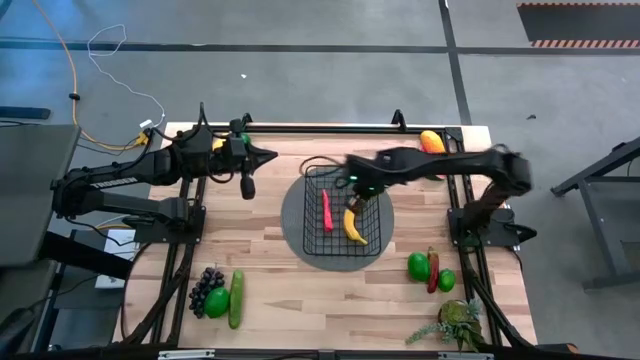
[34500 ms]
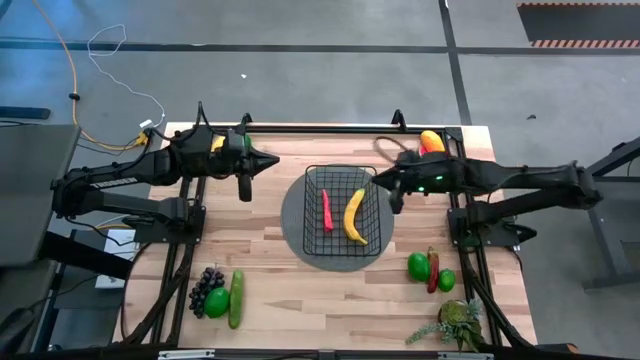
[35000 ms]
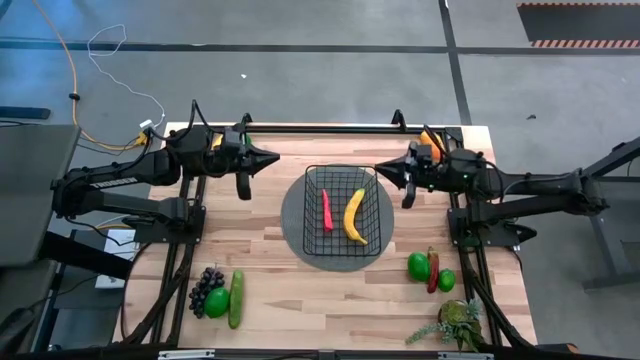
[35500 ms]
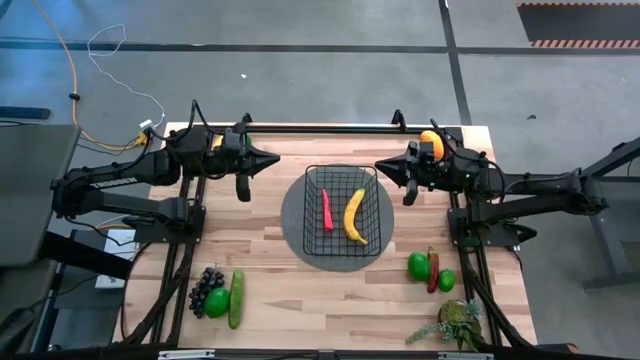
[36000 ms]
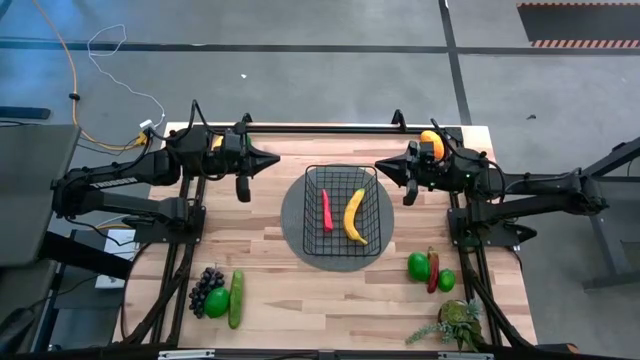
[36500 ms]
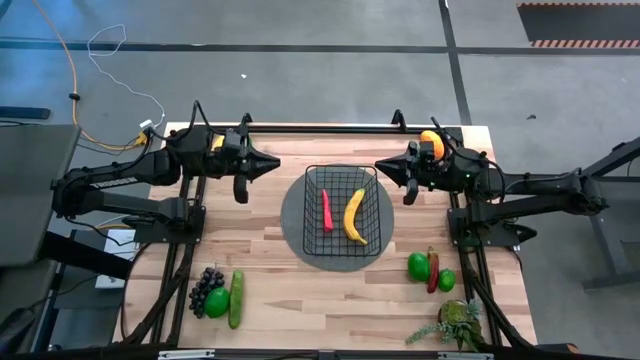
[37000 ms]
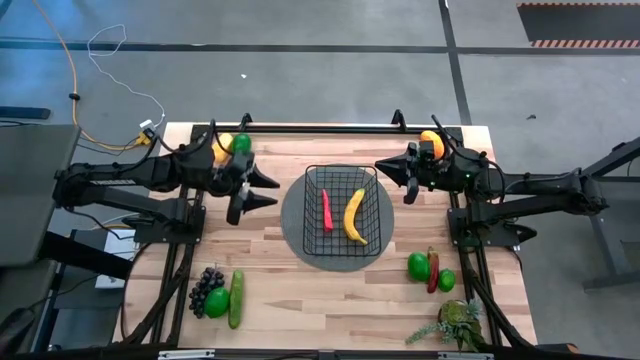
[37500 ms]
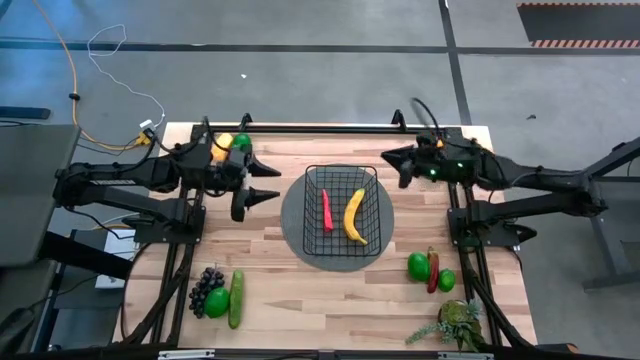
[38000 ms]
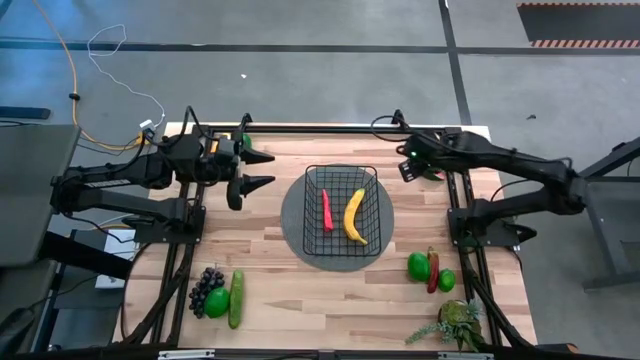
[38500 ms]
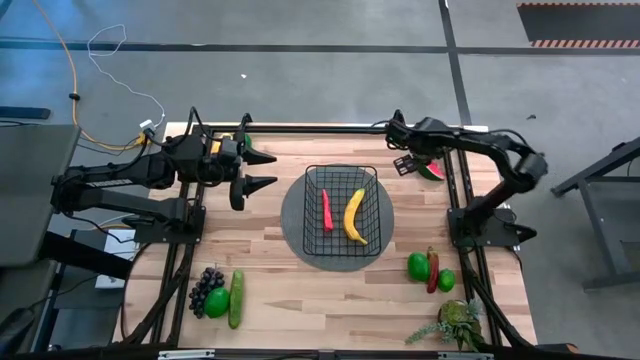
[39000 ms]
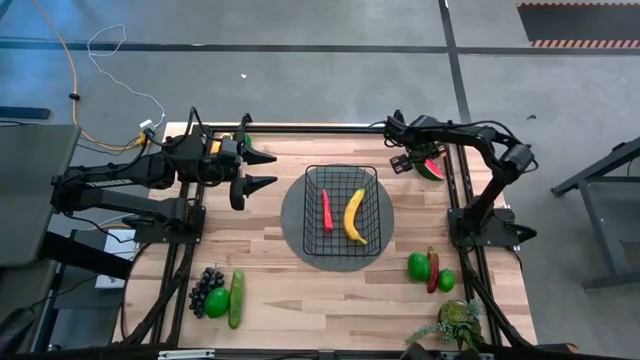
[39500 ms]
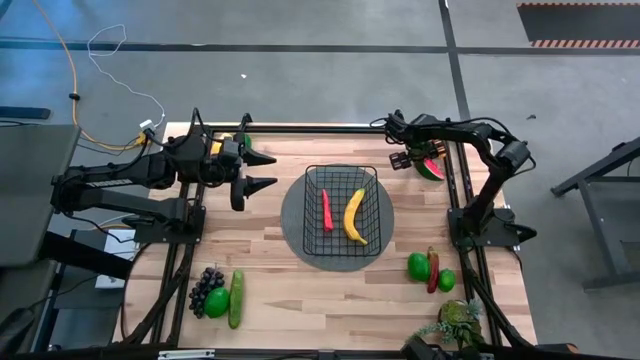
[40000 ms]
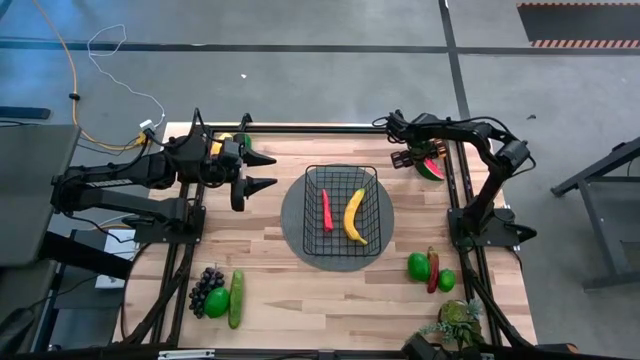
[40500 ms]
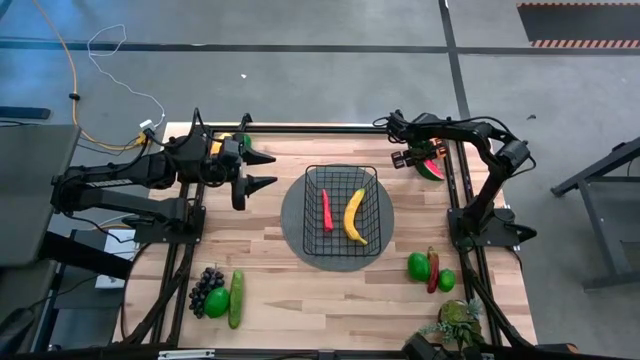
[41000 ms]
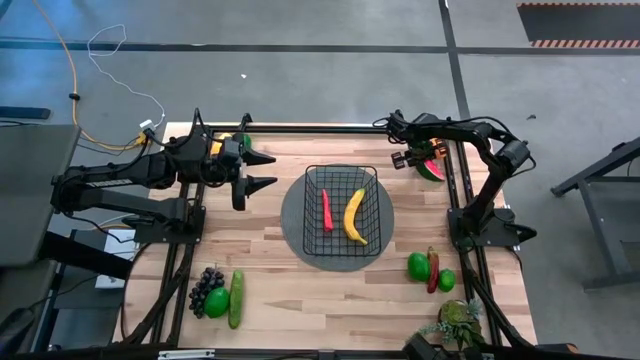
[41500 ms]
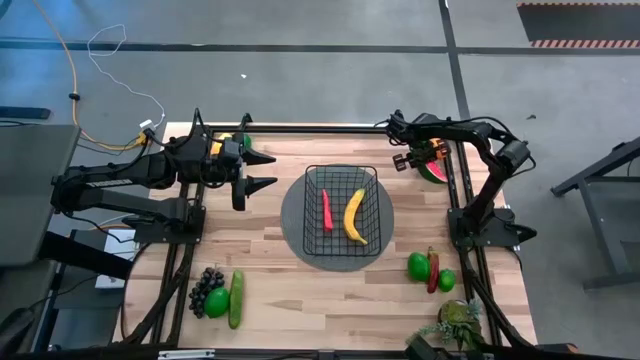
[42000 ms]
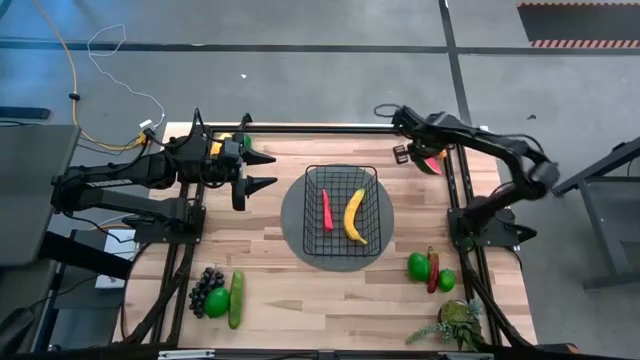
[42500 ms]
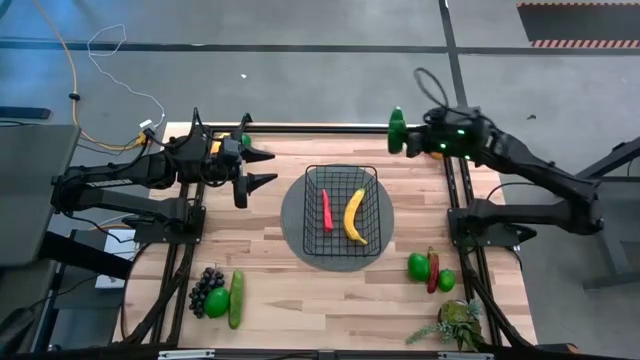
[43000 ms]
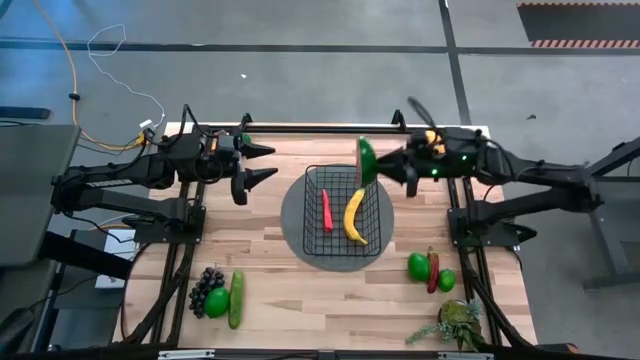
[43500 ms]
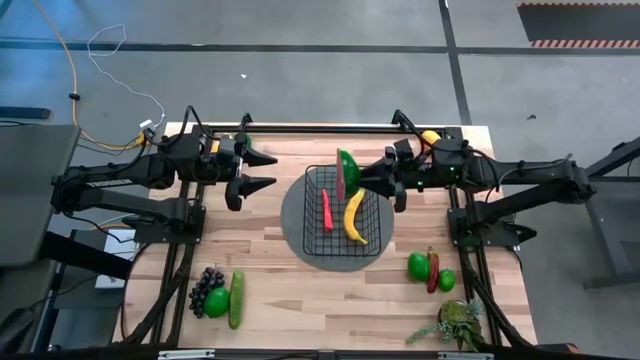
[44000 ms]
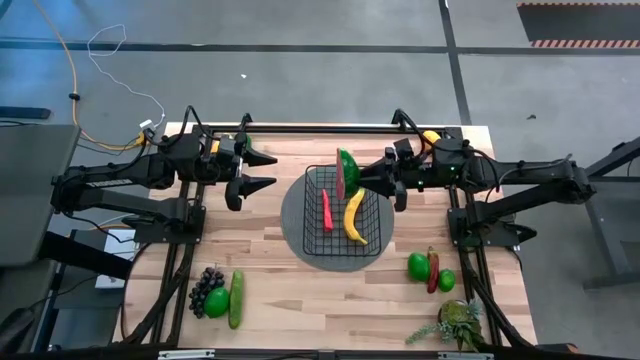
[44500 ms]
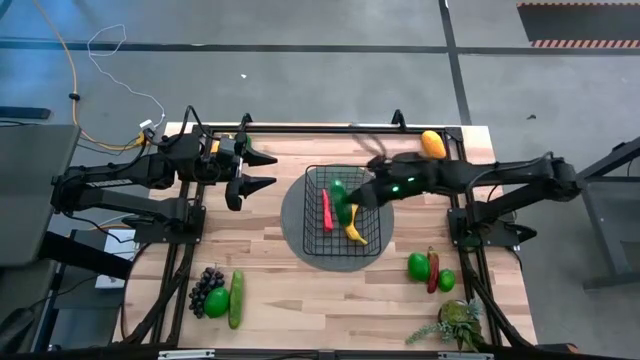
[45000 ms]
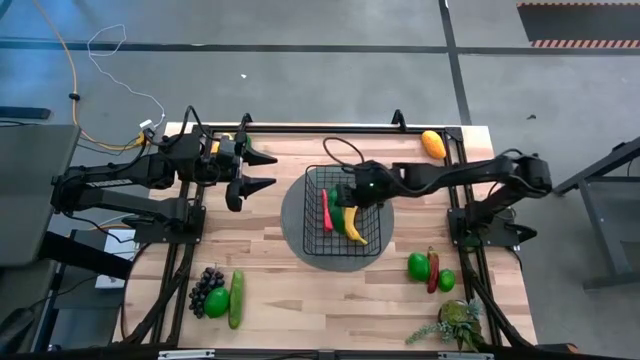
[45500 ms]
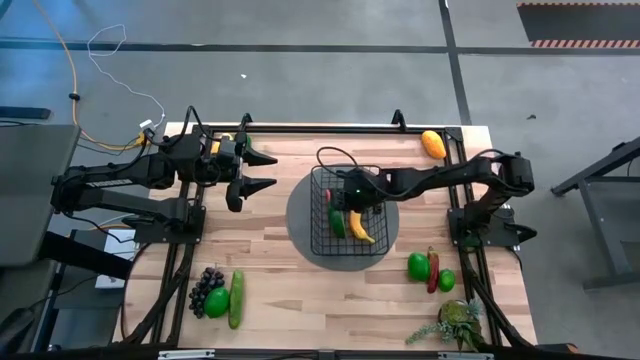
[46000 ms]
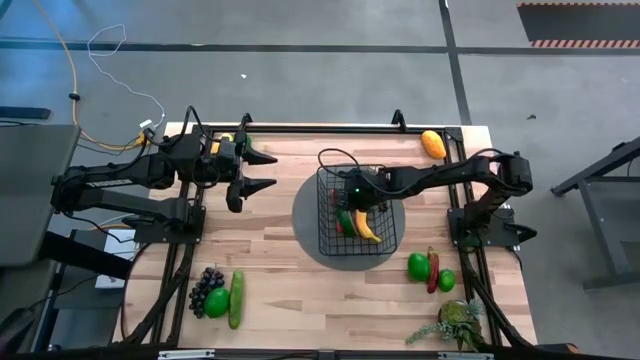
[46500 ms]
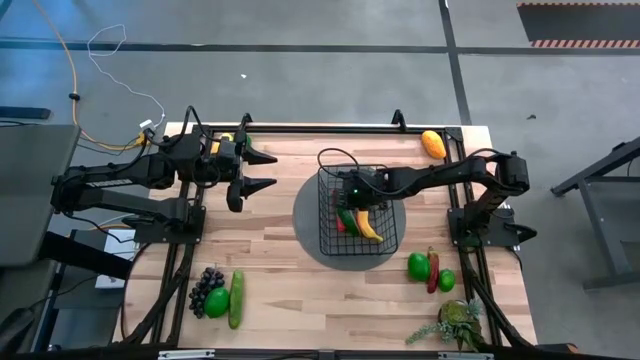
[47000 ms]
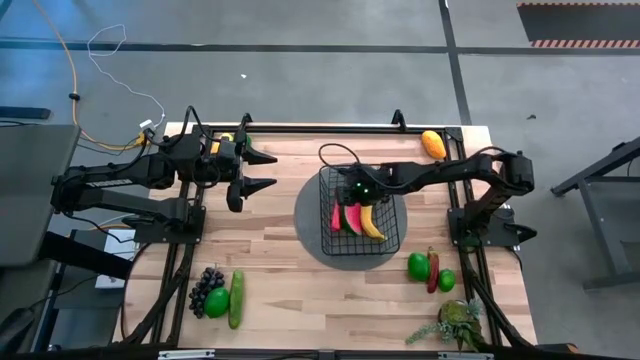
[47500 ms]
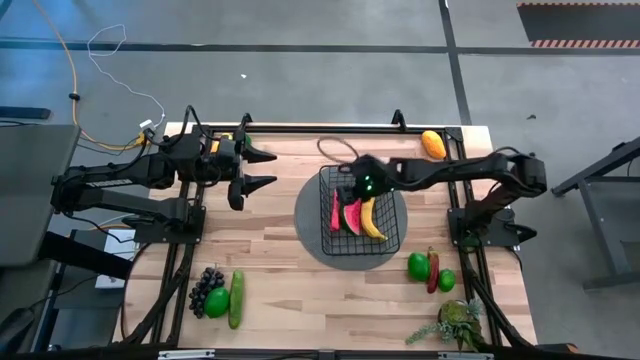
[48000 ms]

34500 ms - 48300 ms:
Task: Build produce basket
Put the watermelon into the black wire basket

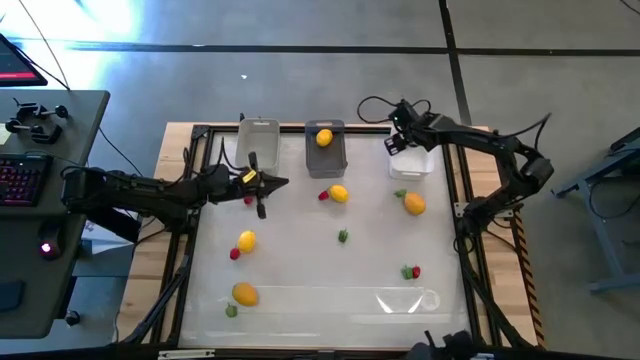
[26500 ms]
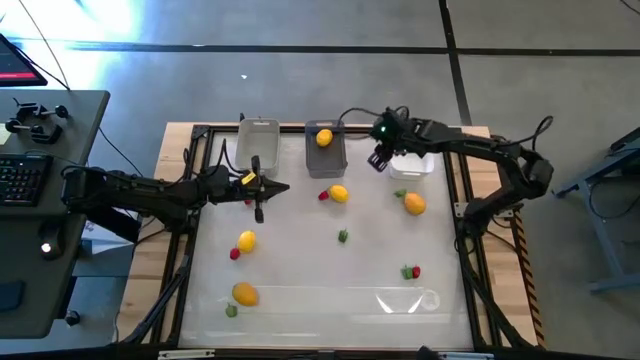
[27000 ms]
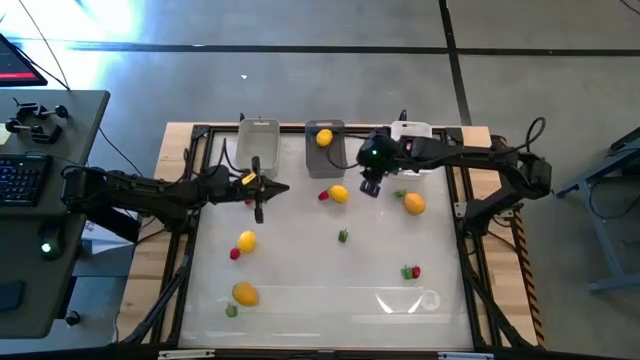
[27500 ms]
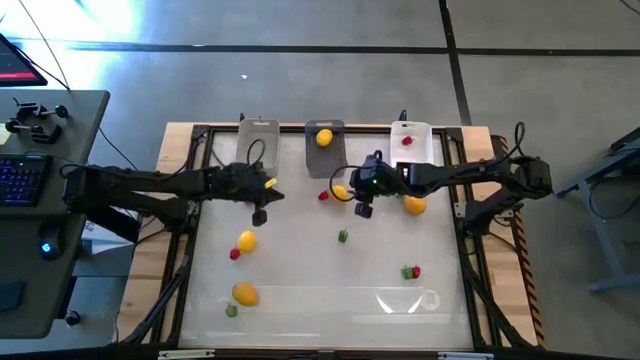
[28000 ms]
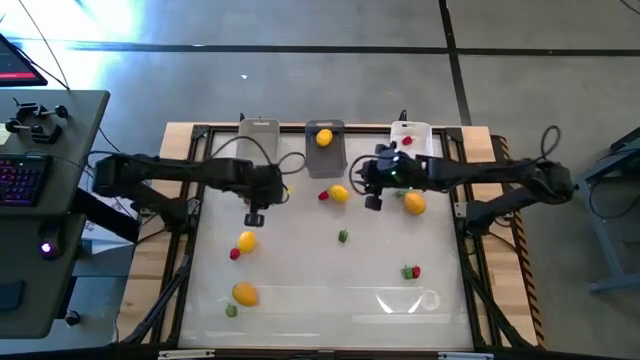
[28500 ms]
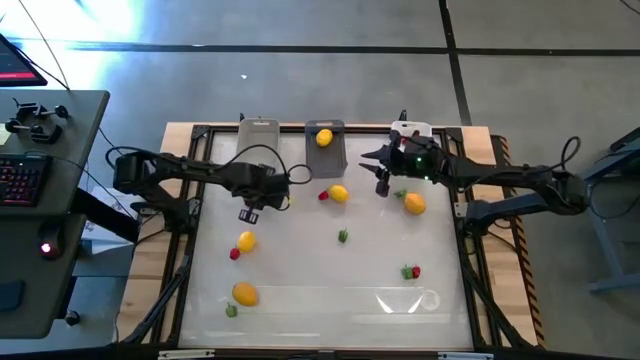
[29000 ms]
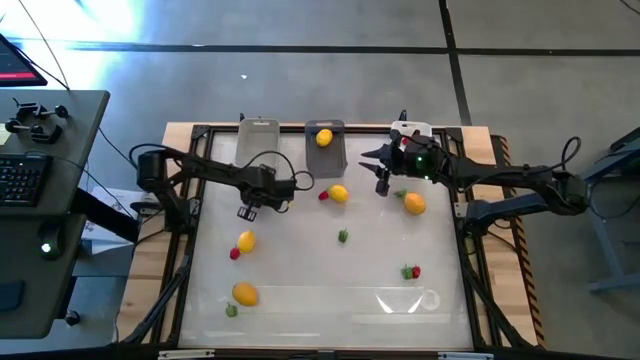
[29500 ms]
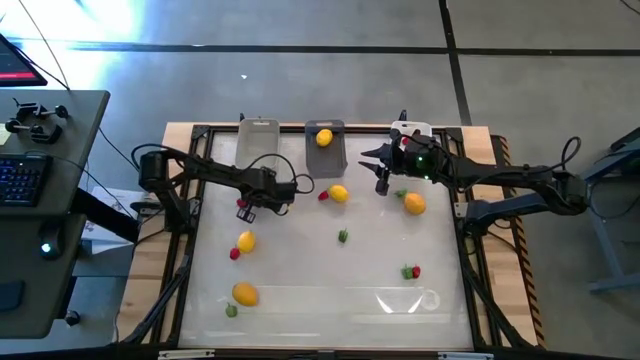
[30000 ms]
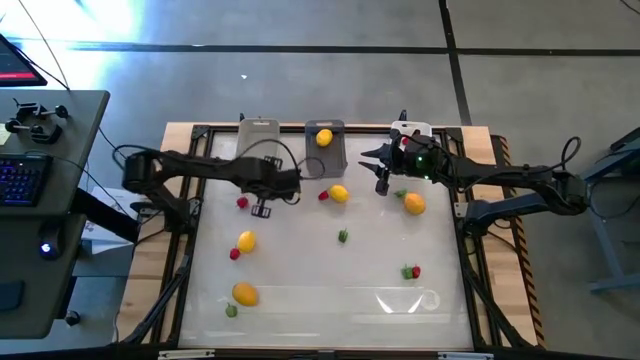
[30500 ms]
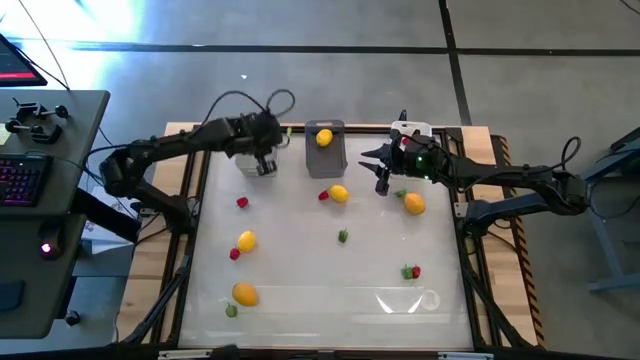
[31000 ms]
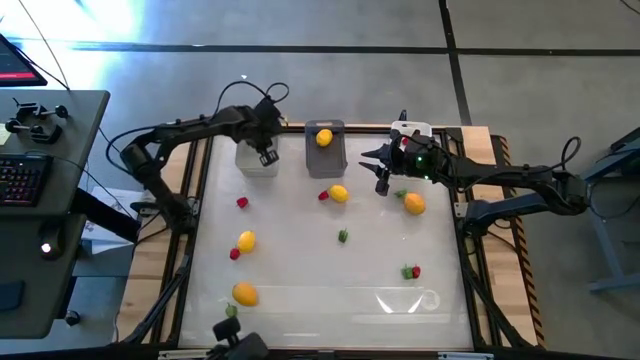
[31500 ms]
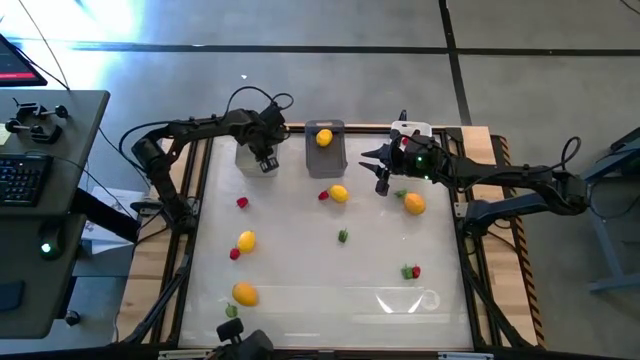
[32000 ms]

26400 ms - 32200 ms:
Task: Sort produce into baskets
Put the top left green bell pepper into the gray bin
